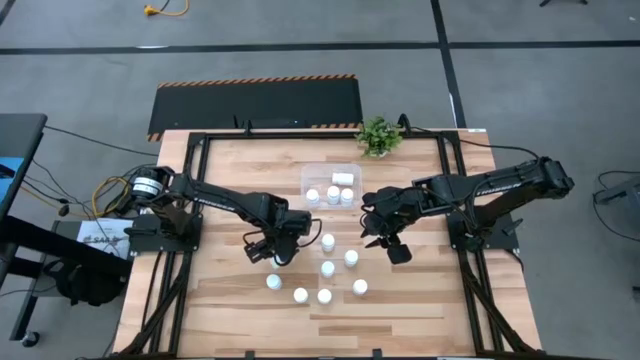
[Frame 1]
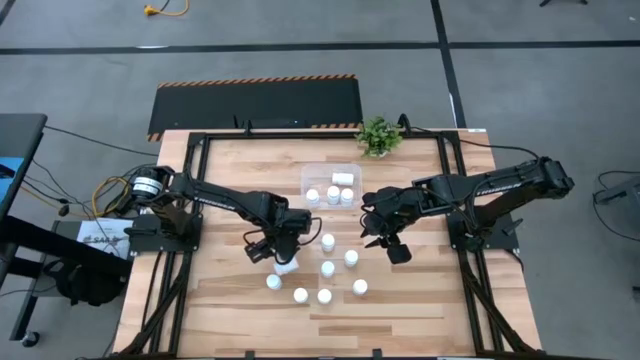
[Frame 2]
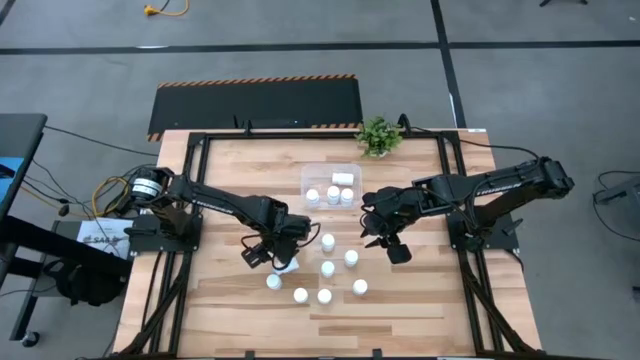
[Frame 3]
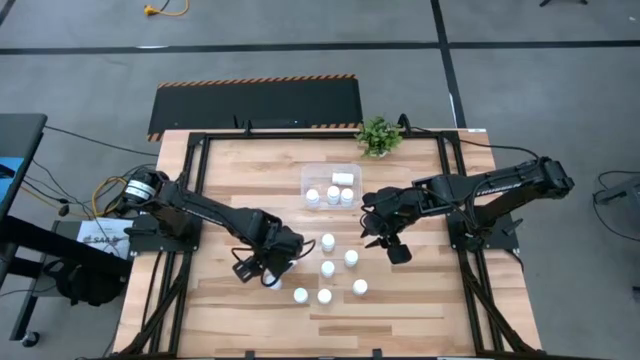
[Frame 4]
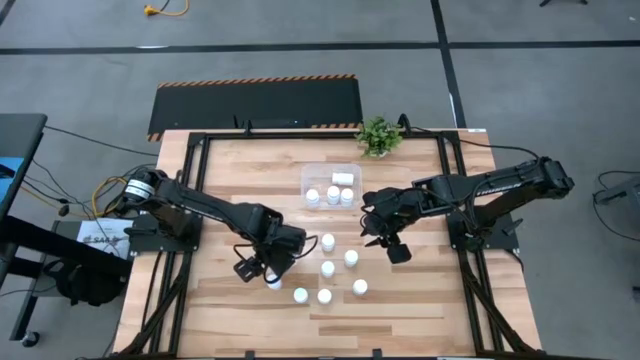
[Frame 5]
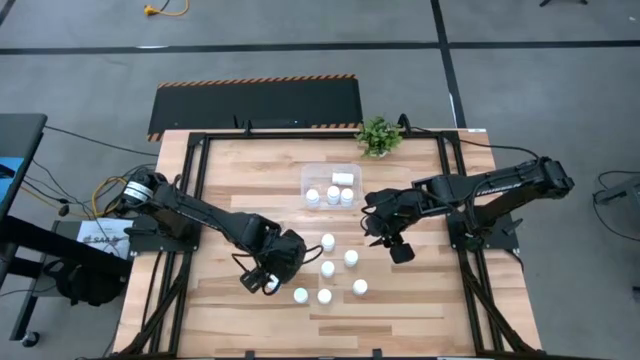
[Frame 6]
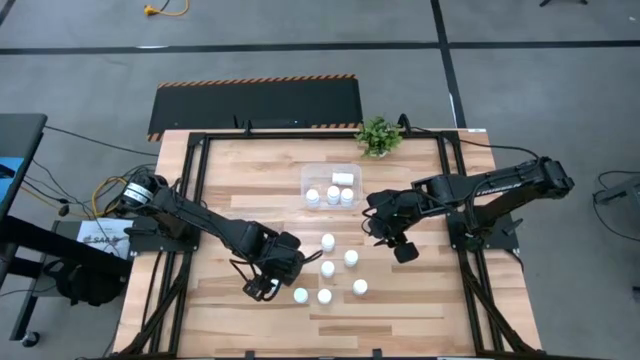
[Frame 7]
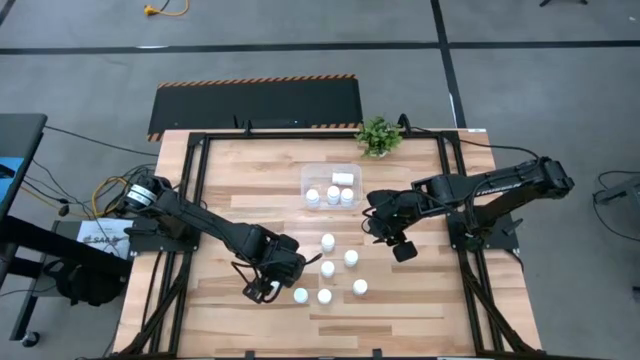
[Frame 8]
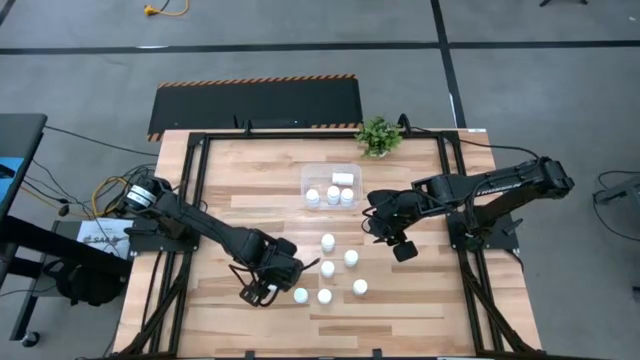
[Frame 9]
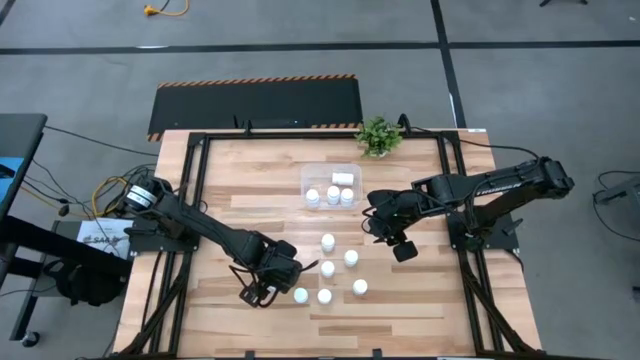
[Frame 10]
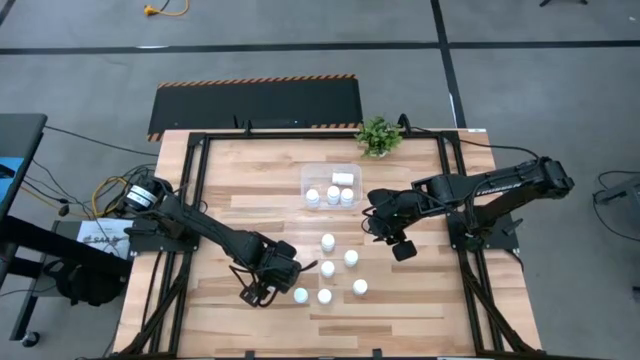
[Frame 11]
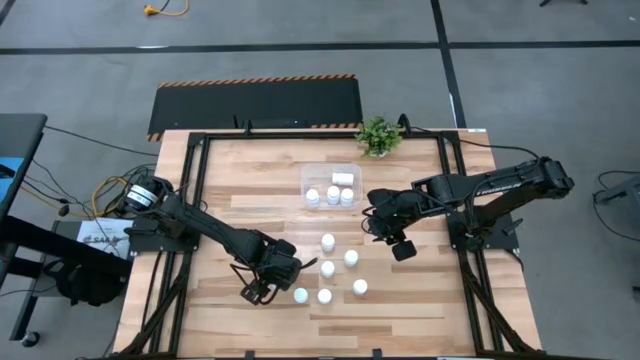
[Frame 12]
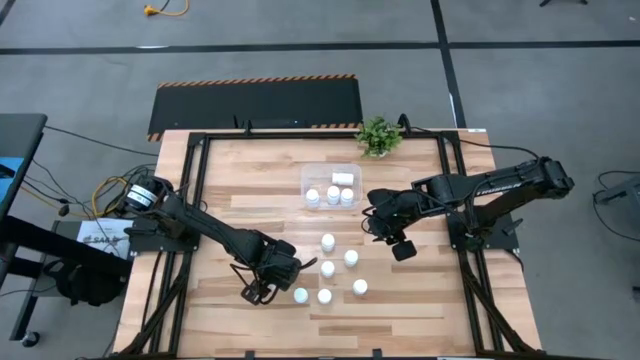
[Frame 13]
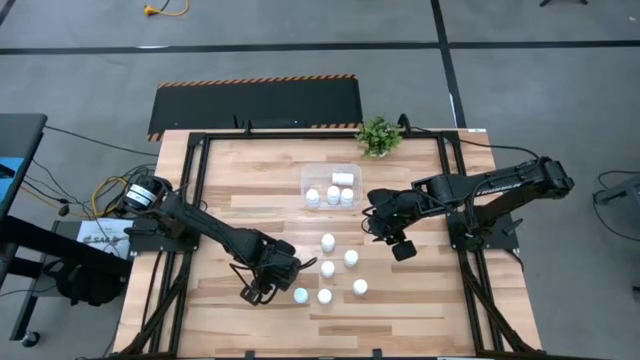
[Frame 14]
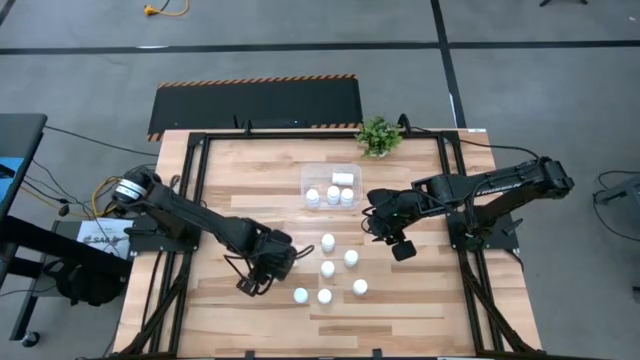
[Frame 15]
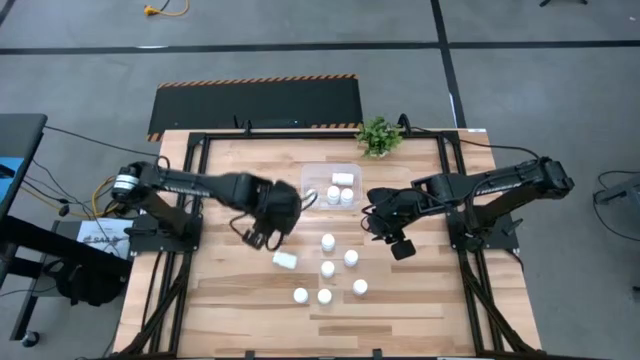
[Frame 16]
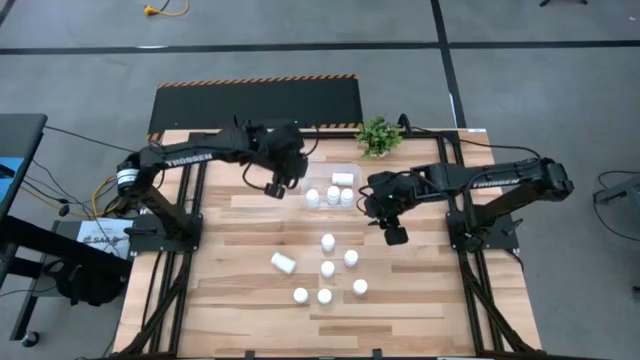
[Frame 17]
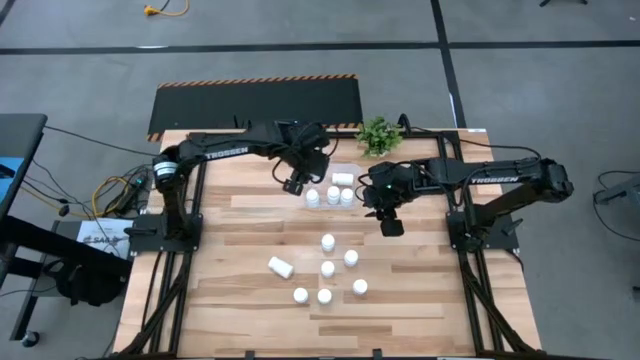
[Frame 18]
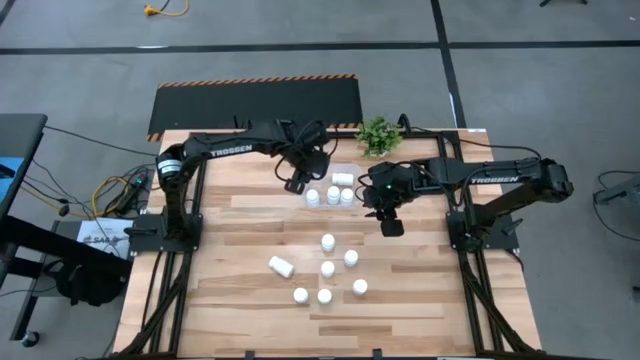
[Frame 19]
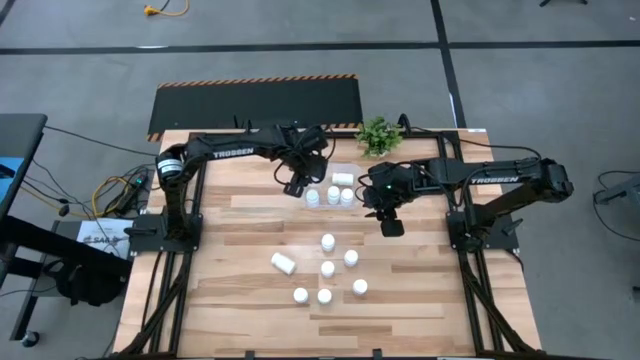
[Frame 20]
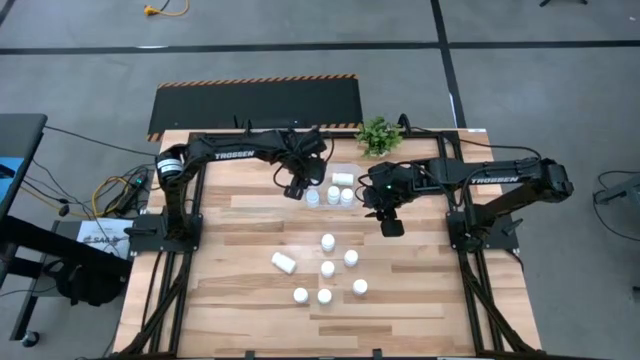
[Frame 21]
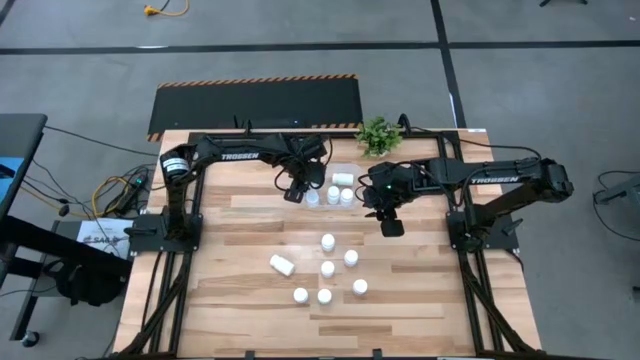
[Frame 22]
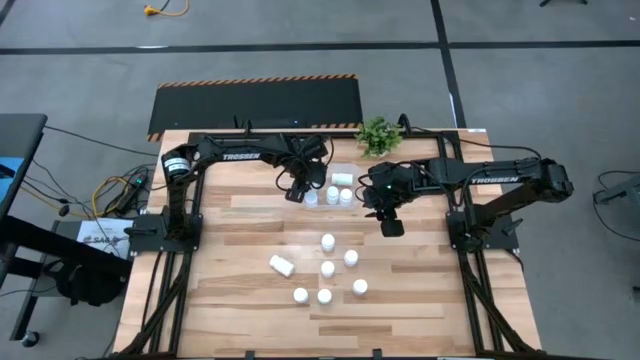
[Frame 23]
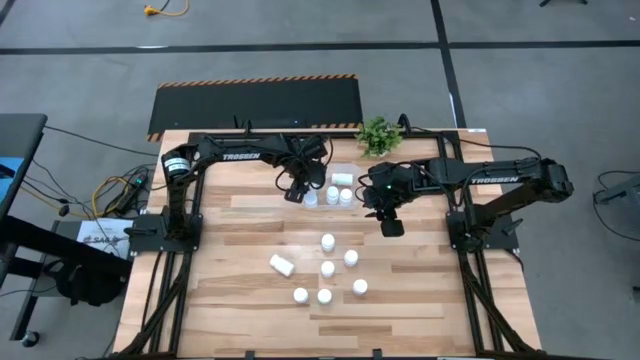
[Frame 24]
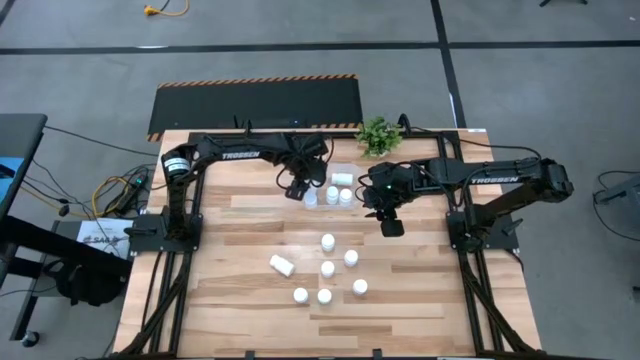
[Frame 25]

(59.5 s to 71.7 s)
Task: Pick and place pill bottles into a basket
Put the white medicine bottle into the transparent bin

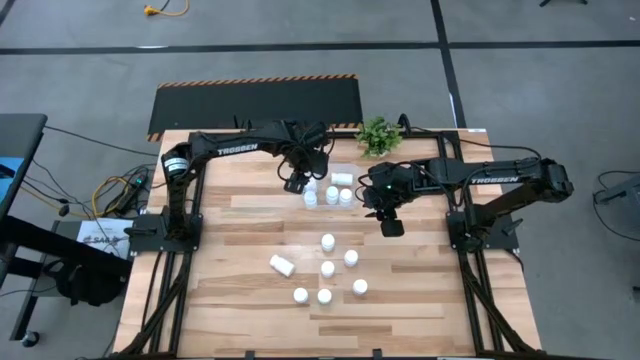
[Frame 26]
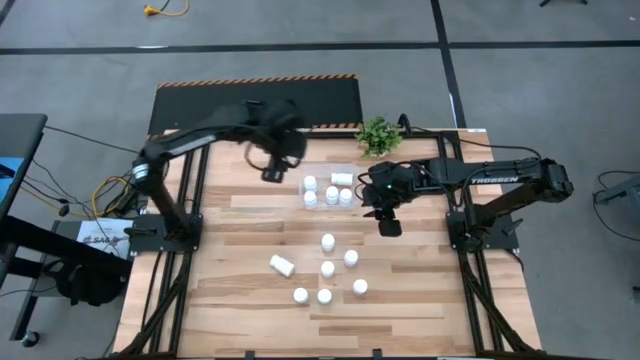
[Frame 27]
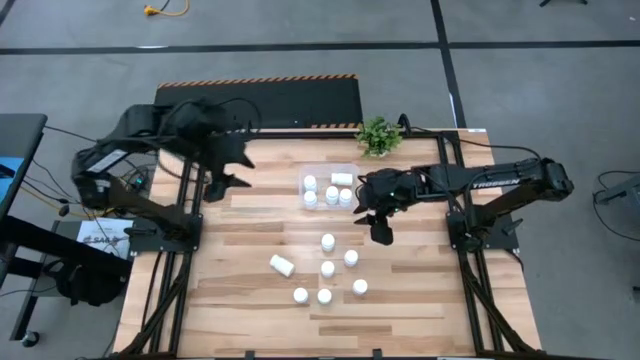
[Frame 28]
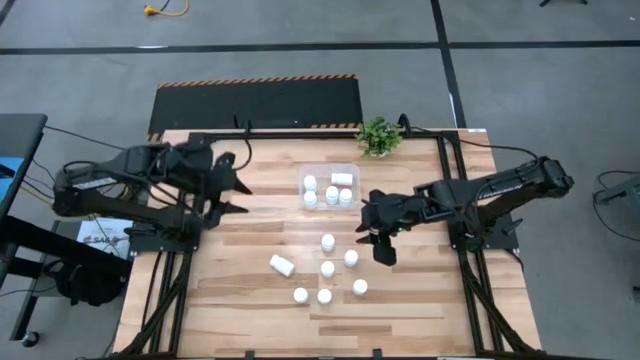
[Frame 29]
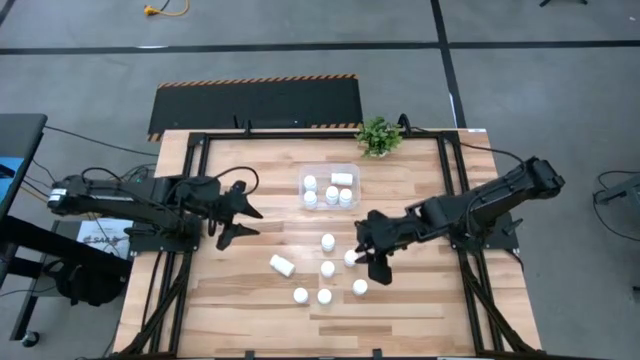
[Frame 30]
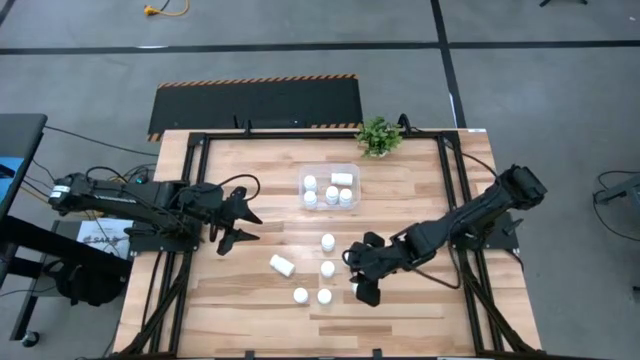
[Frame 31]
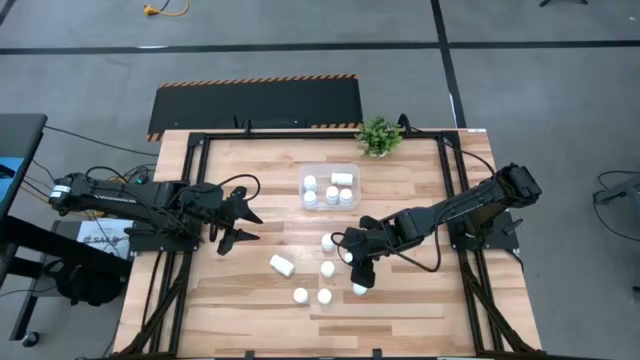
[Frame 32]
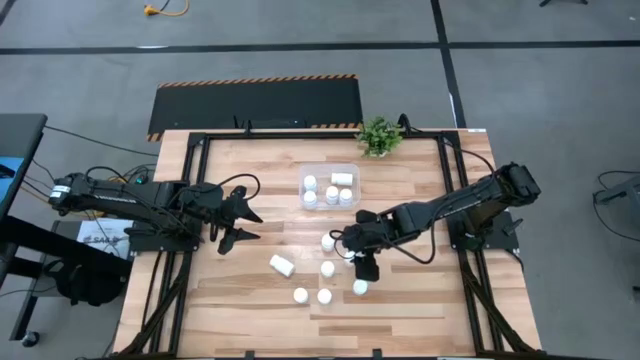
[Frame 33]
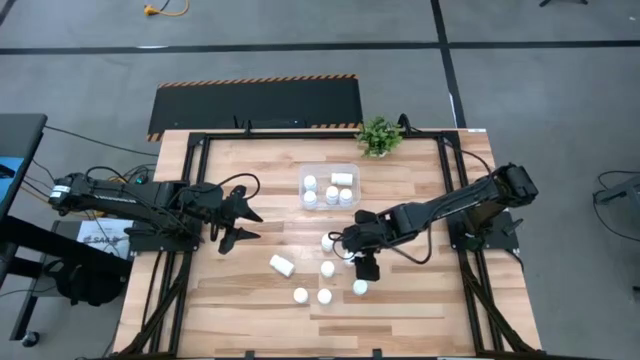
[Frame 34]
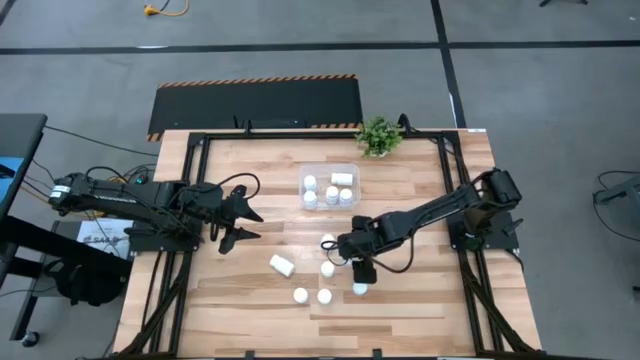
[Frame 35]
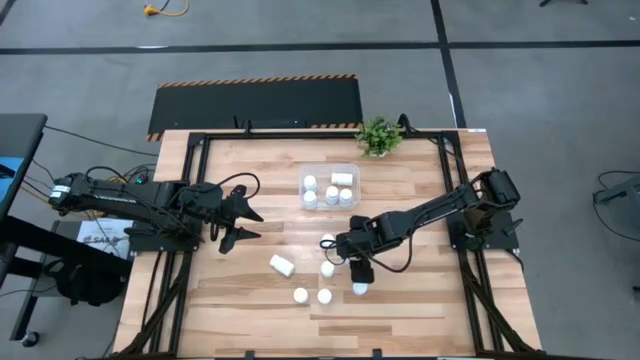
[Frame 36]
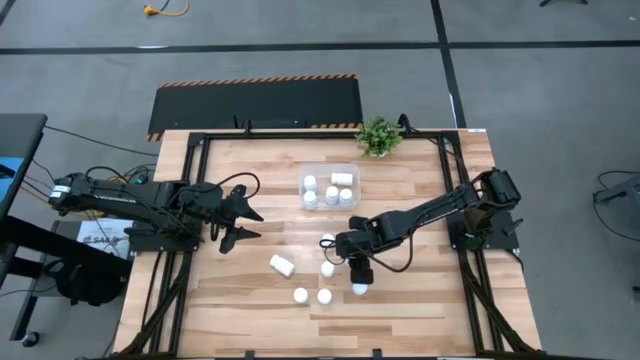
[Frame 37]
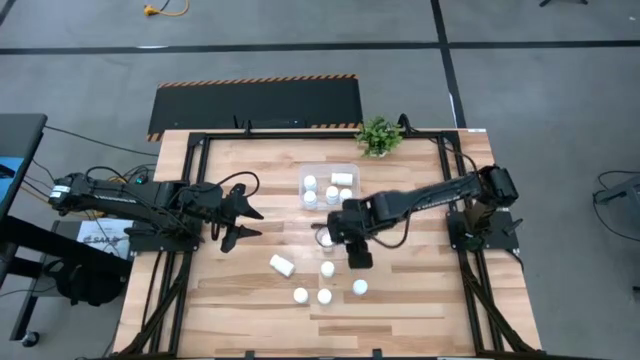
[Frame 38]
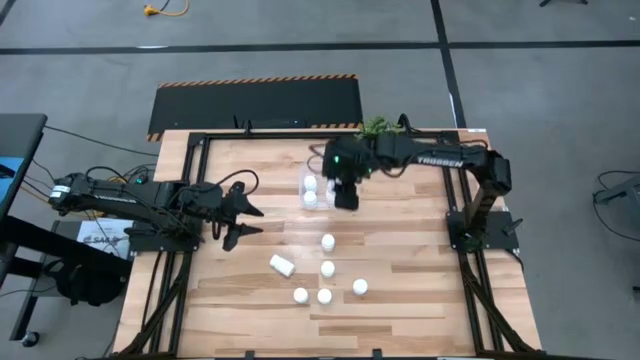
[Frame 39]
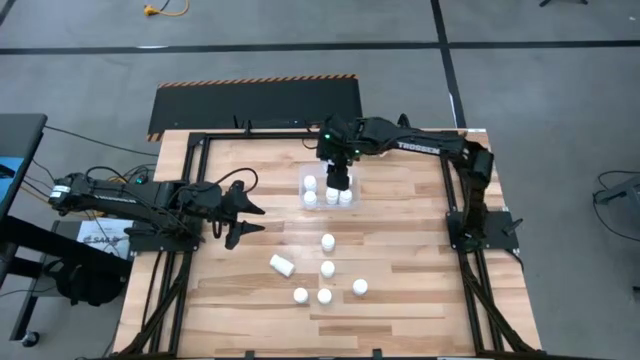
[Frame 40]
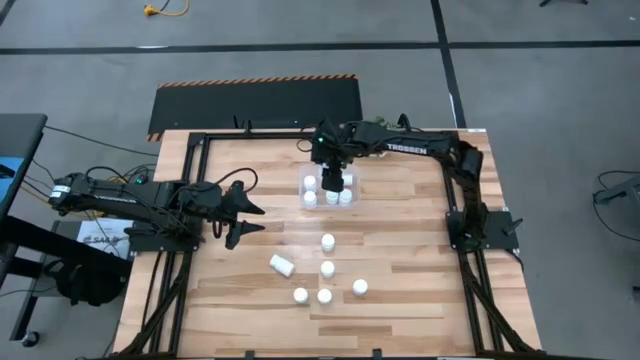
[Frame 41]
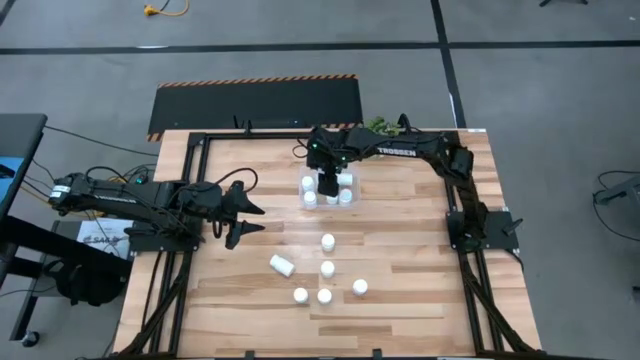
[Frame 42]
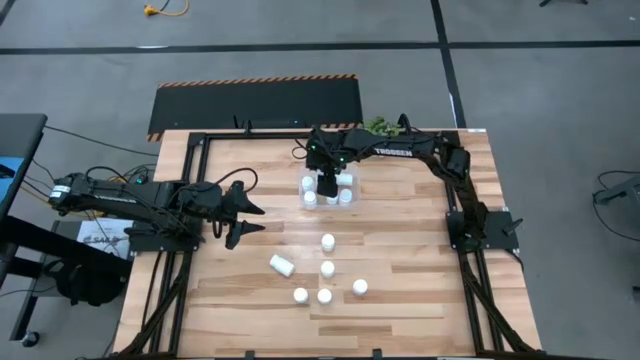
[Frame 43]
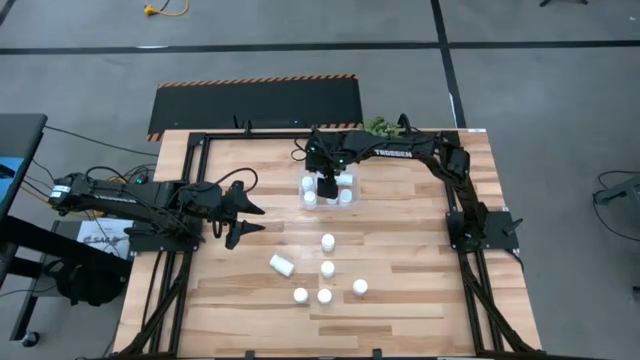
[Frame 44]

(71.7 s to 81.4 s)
Put the white medicine bottle into the transparent bin
